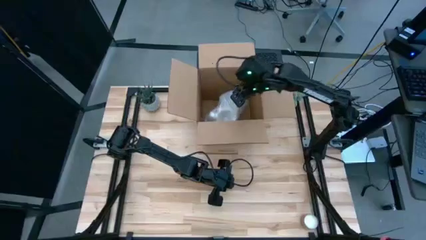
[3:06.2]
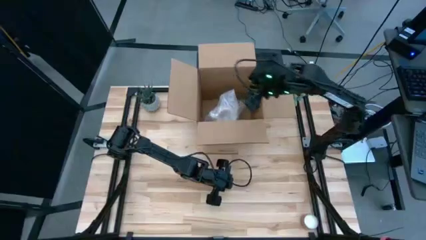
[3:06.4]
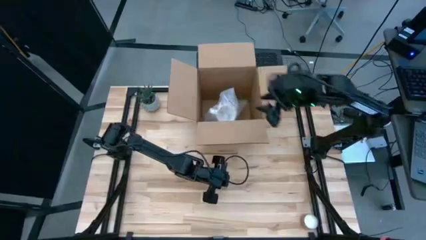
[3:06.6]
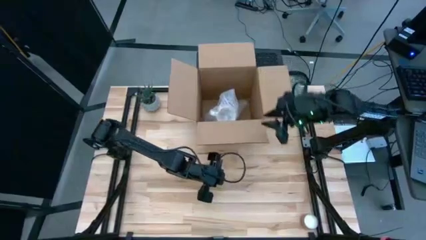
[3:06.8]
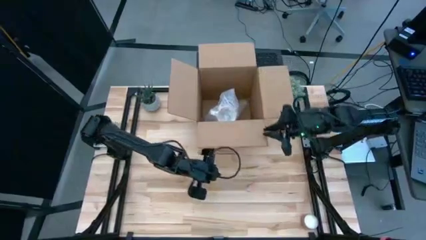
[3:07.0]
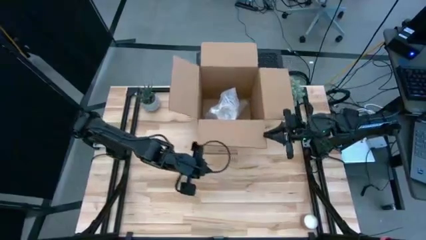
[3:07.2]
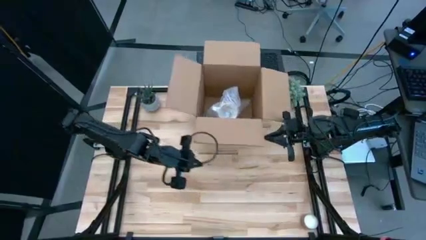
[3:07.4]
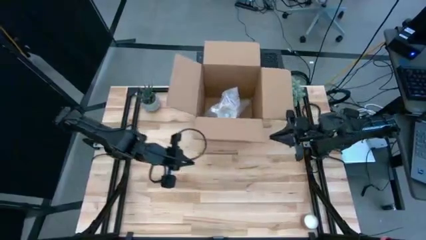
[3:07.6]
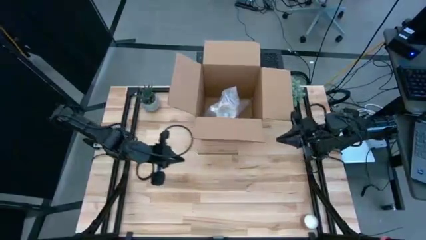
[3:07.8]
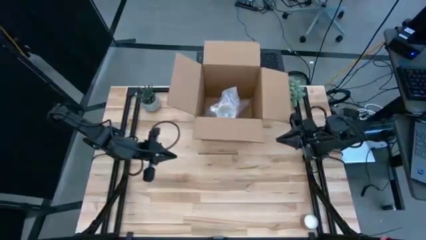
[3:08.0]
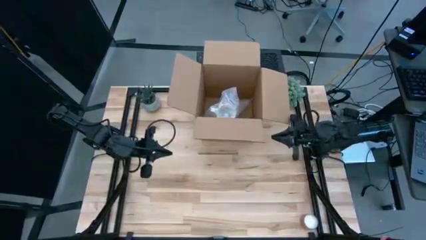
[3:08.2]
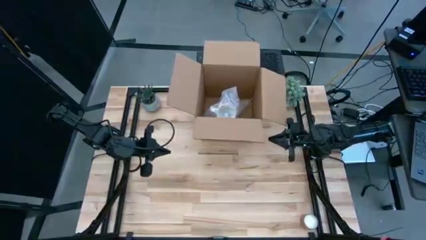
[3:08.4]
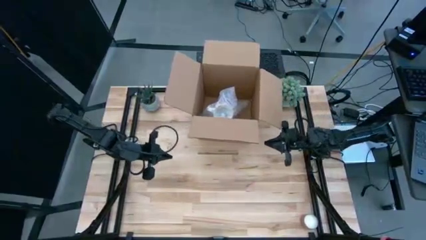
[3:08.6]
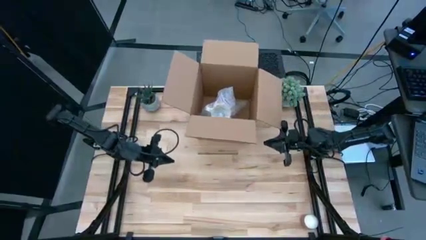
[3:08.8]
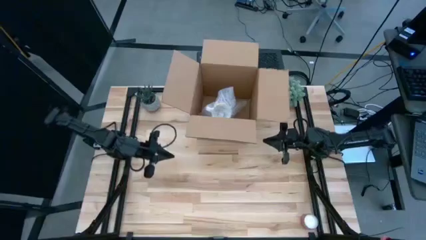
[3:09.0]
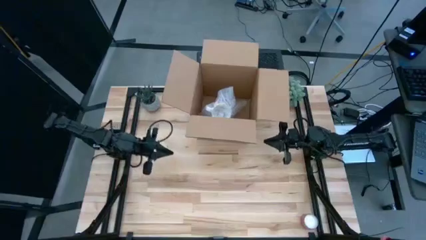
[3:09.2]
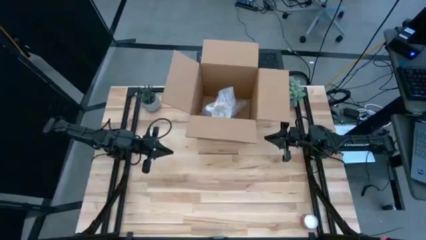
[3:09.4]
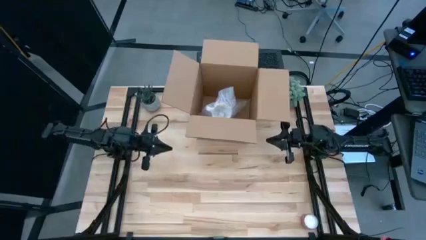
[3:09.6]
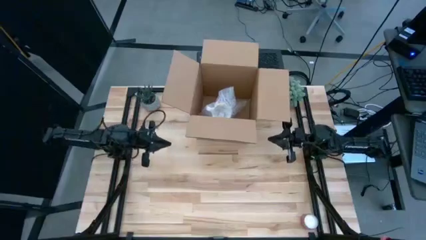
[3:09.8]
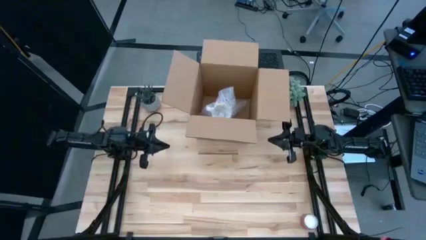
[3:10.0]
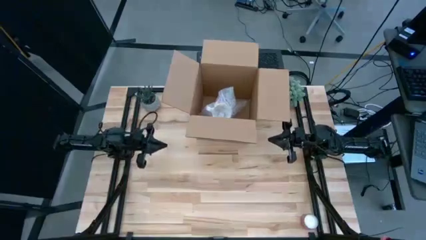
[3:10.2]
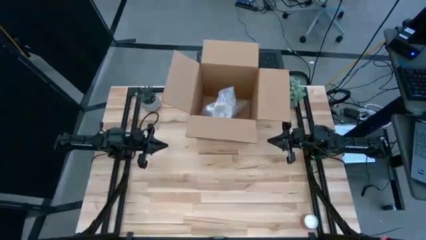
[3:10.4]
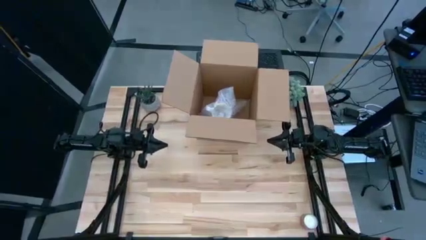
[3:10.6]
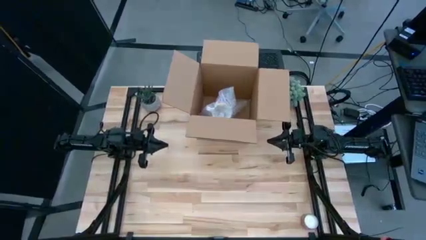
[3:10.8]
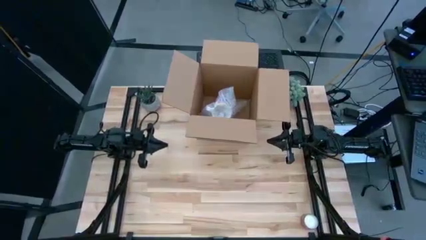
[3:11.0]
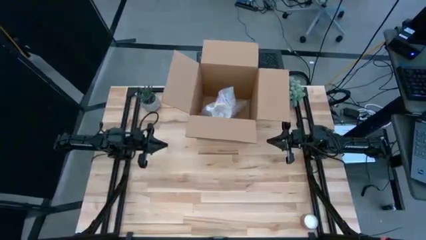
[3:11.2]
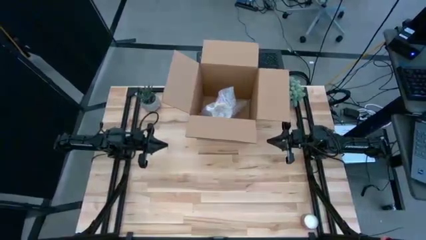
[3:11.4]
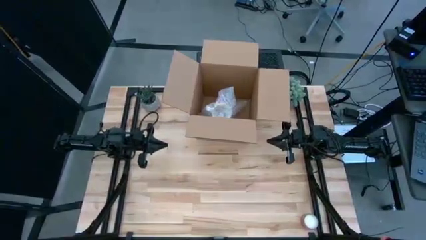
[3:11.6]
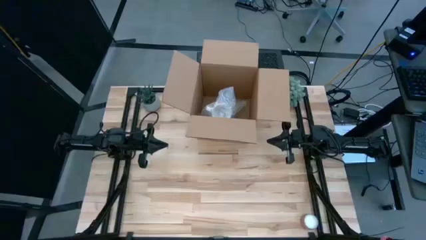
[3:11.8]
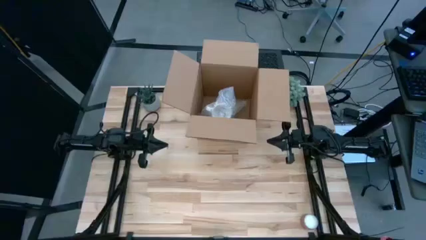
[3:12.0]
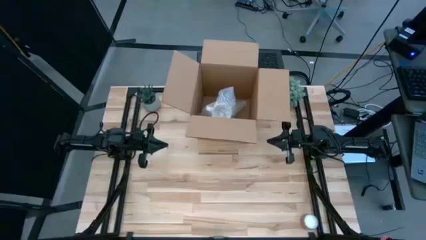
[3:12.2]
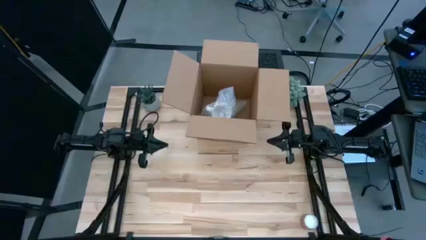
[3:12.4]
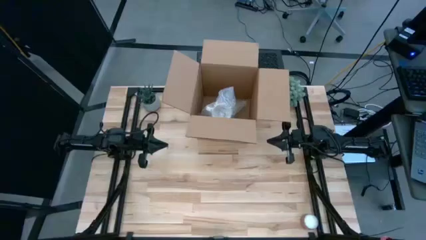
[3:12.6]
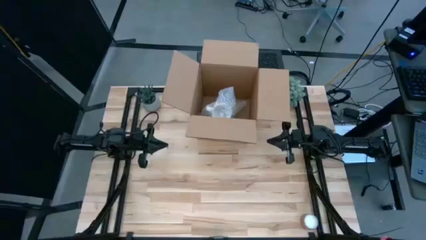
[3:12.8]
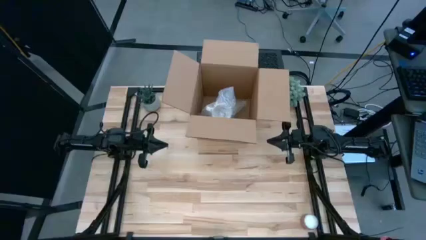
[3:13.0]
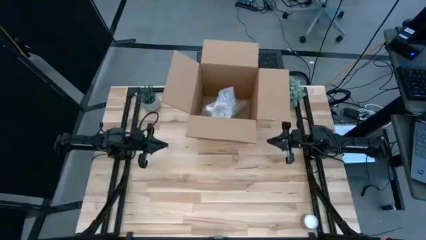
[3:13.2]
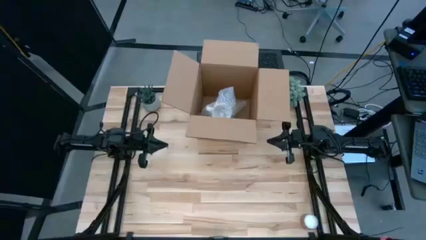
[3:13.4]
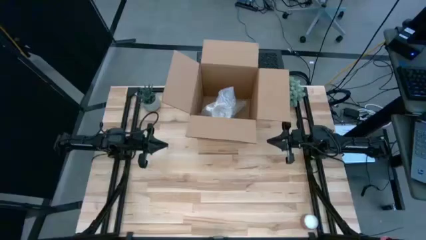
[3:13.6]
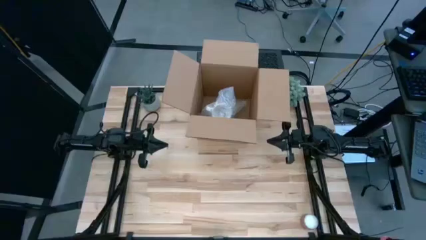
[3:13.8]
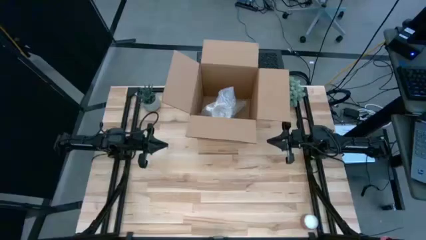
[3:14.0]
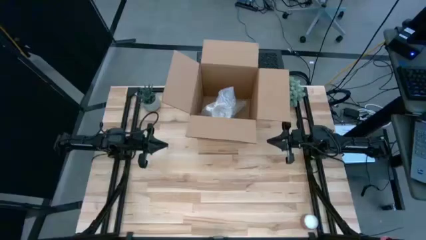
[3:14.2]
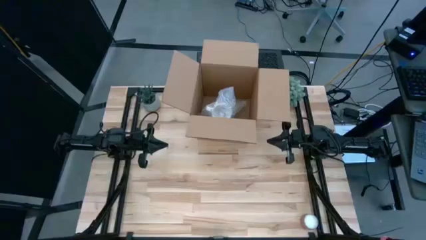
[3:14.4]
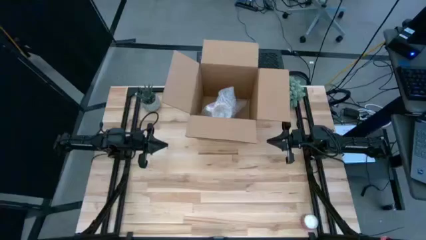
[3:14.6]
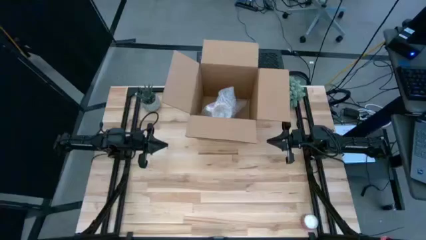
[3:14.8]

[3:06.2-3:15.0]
Task: wrap mug
Return to Home Position

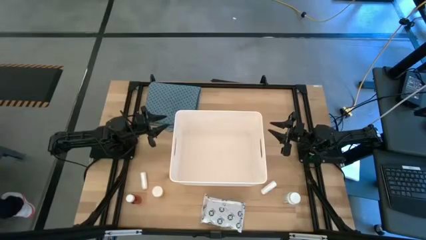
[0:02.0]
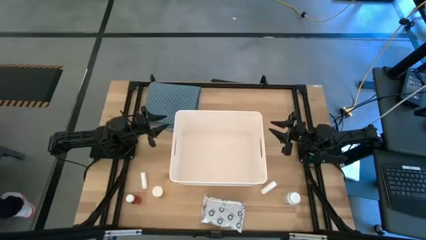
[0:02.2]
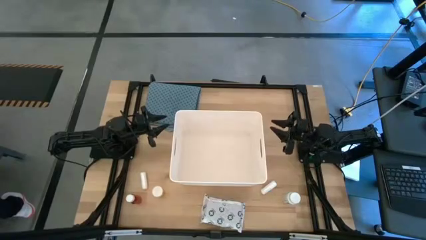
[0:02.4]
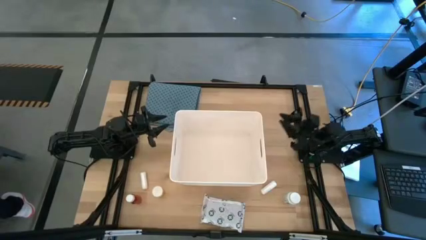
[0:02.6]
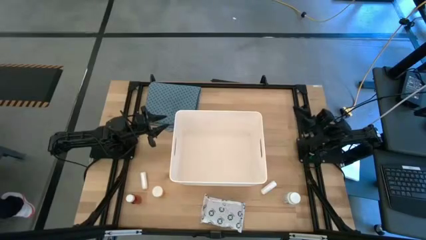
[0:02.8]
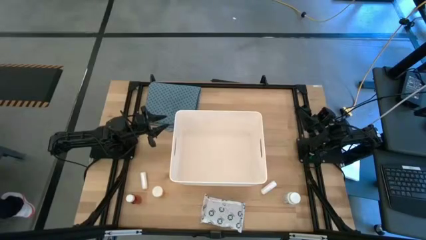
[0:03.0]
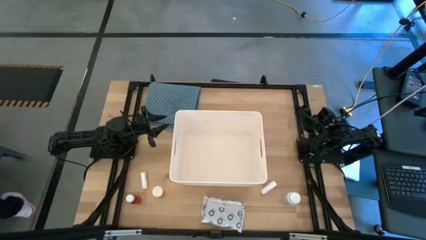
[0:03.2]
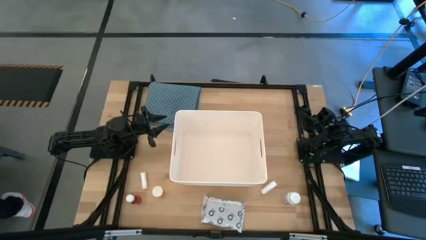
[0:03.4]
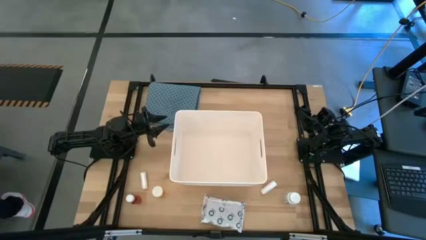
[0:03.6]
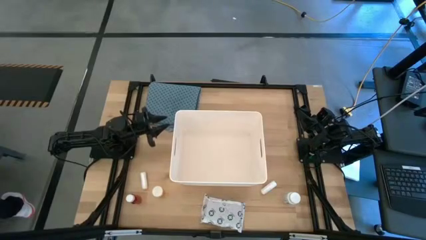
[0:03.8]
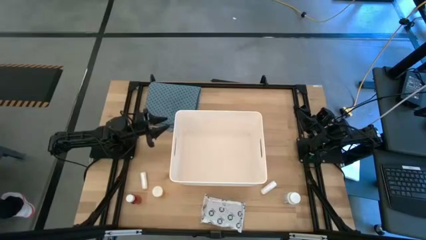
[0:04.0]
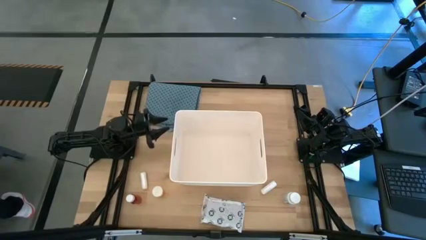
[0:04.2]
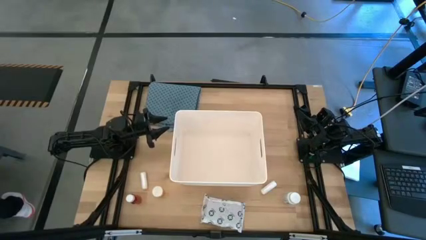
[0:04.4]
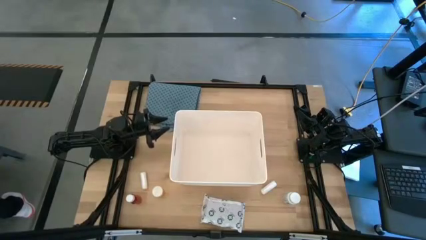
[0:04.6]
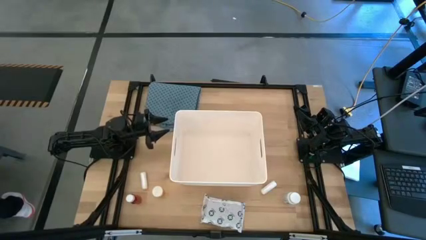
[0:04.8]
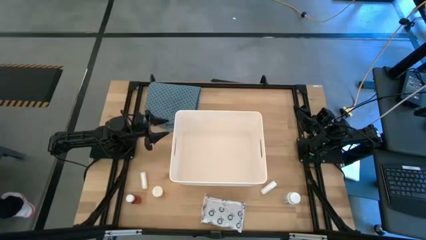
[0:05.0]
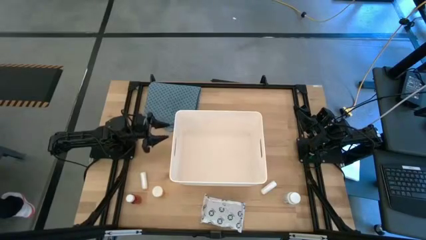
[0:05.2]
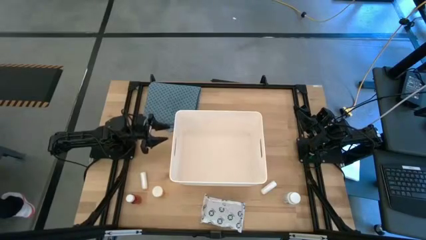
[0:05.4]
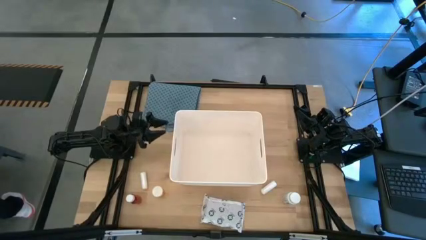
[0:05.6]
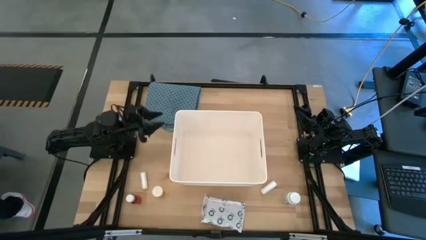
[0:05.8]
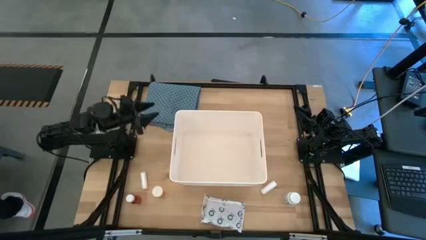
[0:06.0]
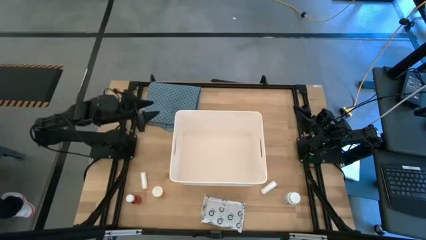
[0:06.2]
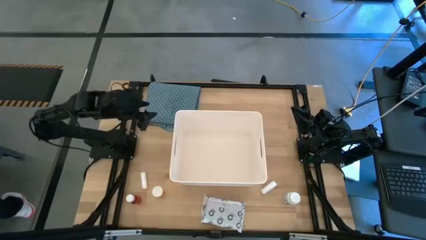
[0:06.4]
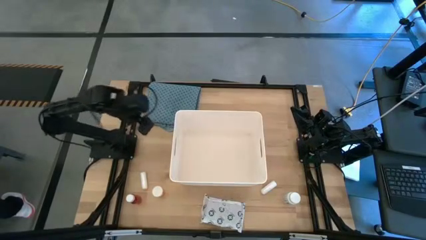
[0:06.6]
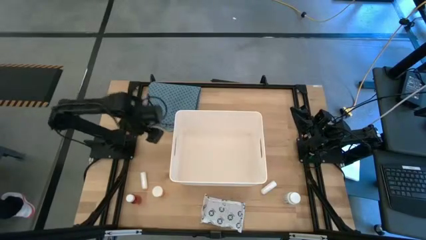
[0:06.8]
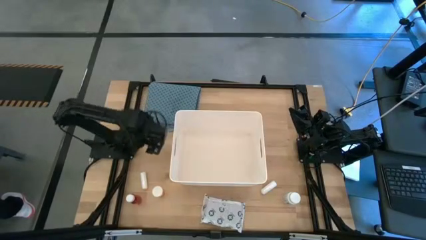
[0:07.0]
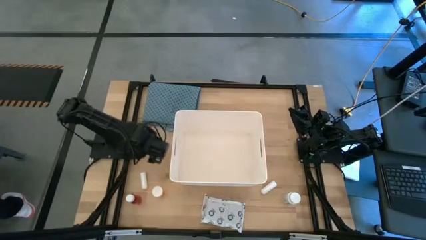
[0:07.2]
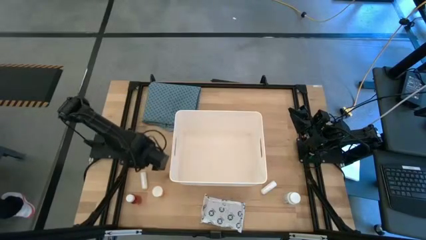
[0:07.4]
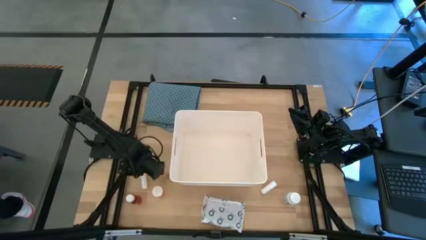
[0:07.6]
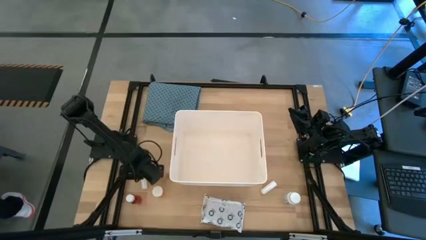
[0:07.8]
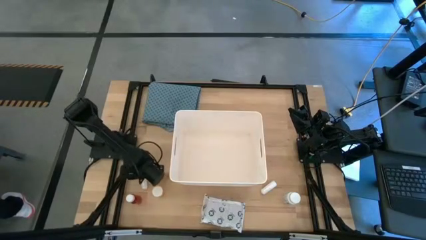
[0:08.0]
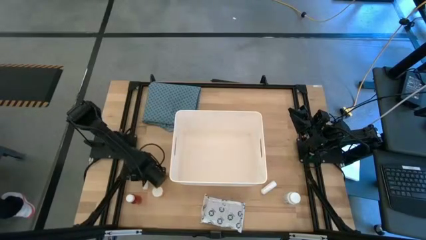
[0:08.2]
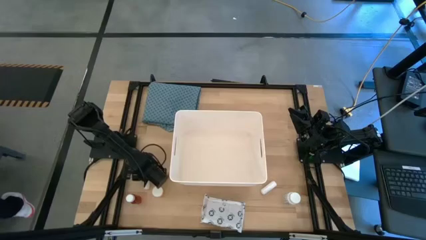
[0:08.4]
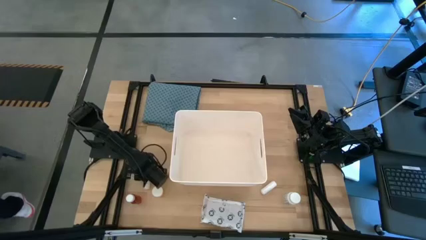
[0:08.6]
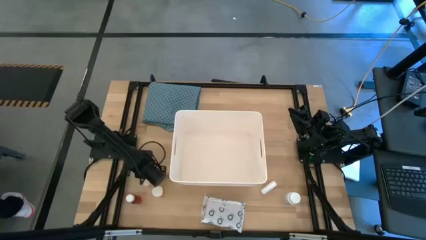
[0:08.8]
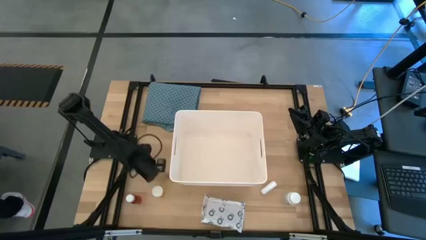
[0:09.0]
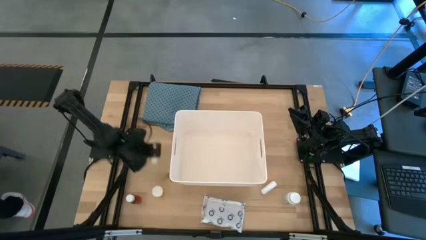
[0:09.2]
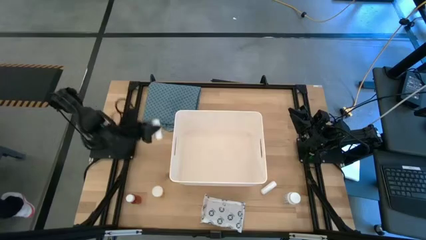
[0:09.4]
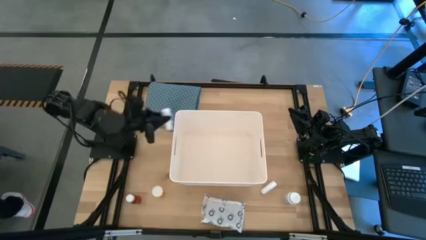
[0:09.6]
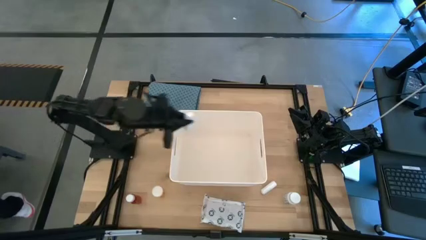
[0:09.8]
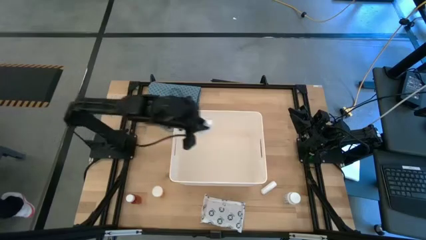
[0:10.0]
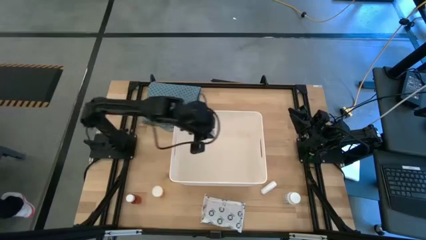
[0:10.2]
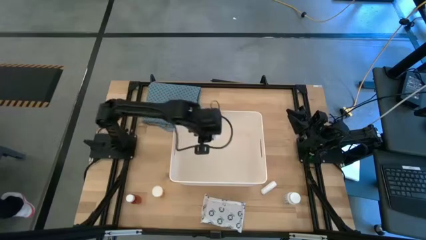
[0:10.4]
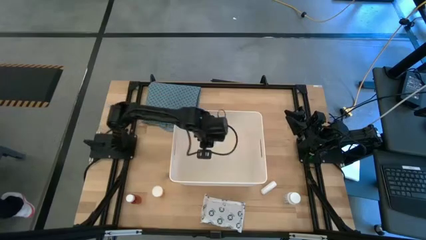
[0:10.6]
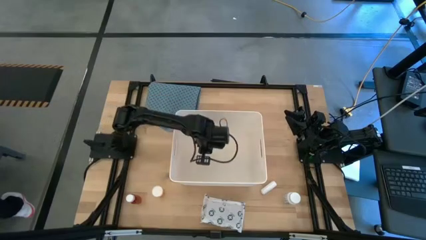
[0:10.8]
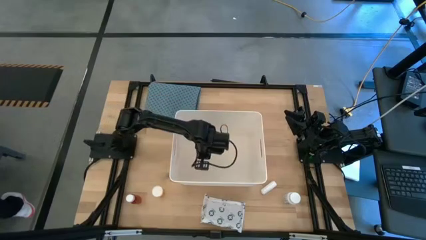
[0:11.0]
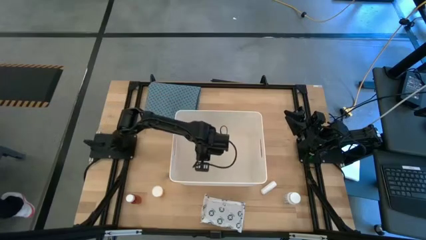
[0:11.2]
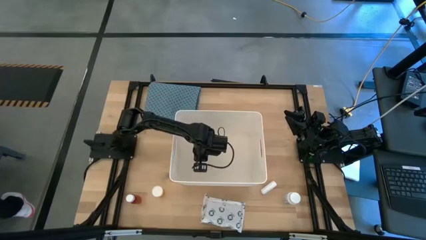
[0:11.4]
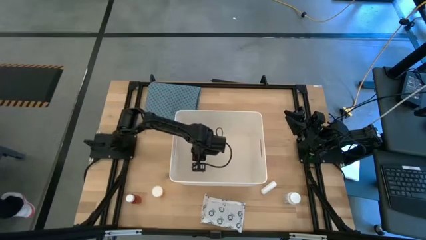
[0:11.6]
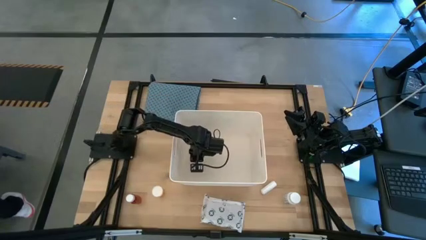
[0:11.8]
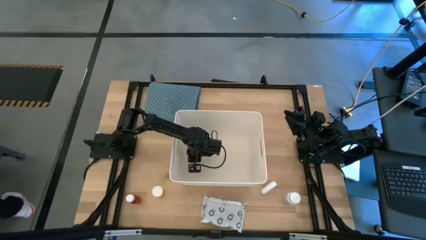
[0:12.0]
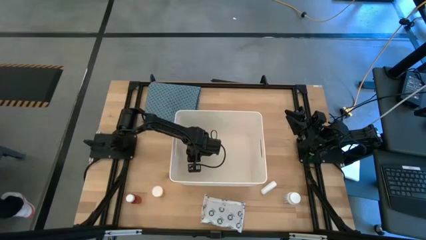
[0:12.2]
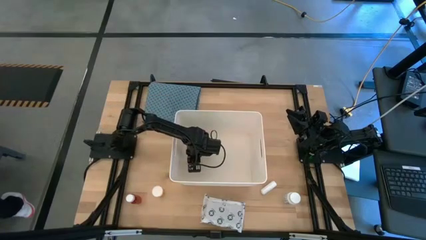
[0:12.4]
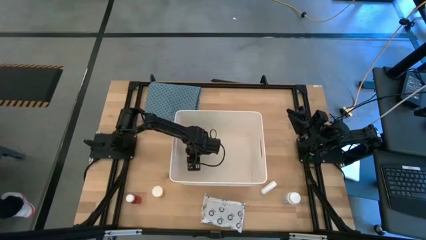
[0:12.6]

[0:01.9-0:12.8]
Task: Pick & place medical supplies in basket/bin
Put the left white rolled gauze into the white basket
